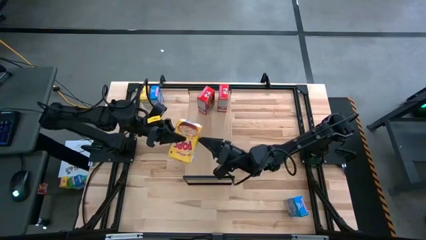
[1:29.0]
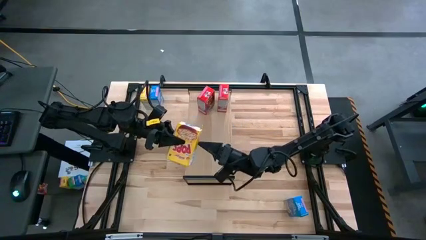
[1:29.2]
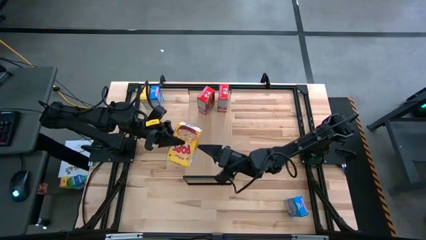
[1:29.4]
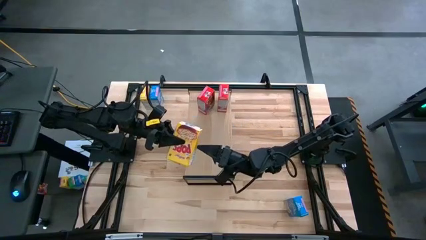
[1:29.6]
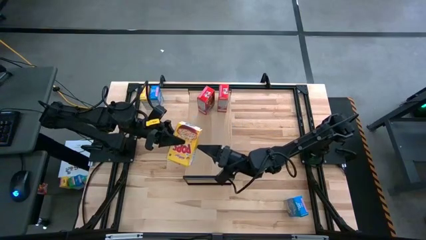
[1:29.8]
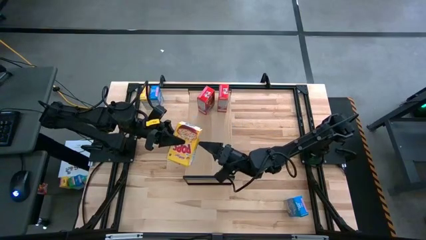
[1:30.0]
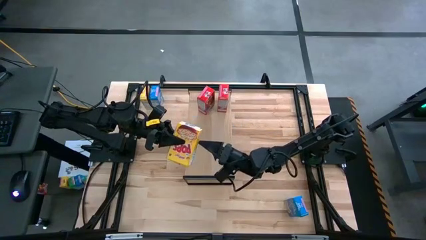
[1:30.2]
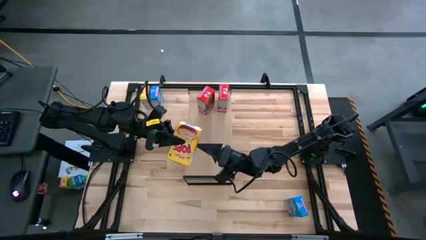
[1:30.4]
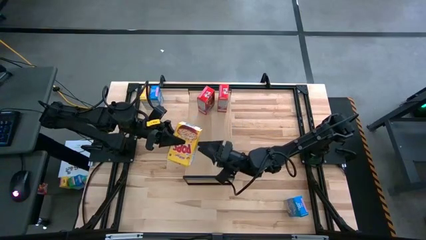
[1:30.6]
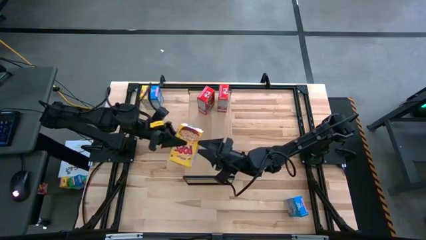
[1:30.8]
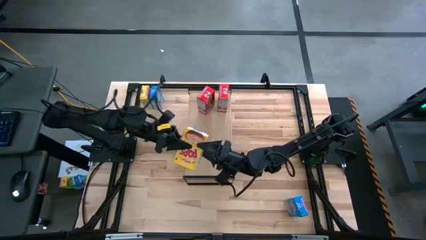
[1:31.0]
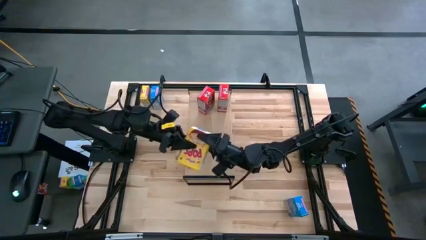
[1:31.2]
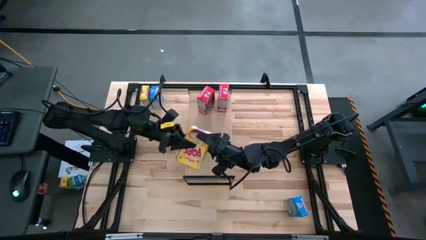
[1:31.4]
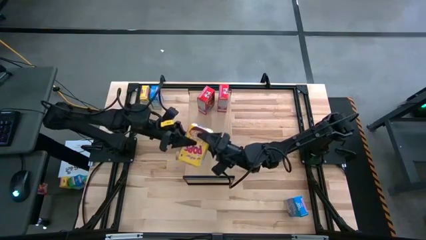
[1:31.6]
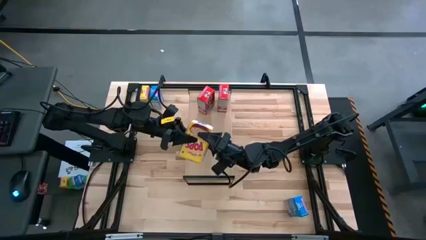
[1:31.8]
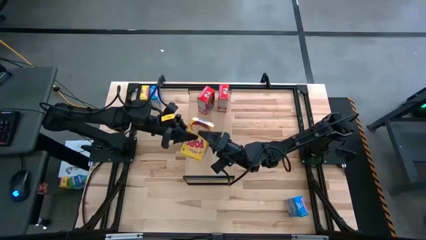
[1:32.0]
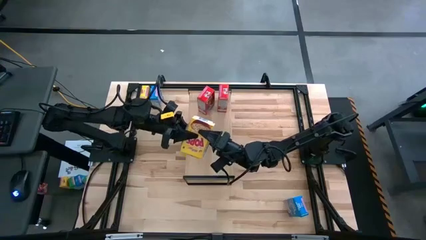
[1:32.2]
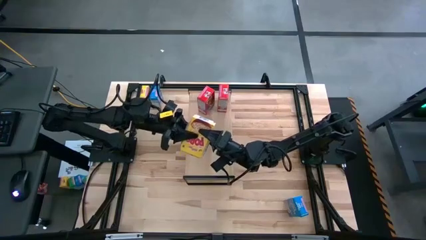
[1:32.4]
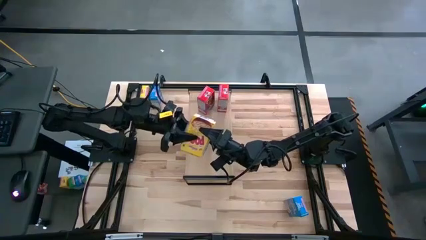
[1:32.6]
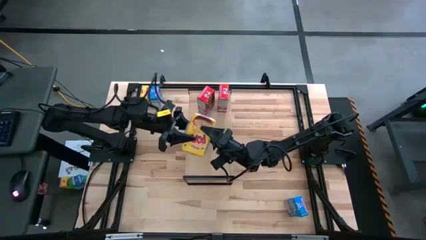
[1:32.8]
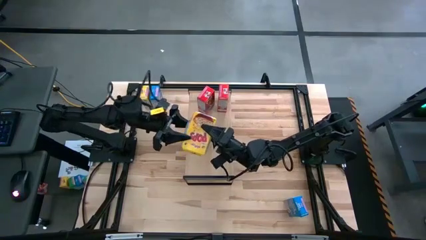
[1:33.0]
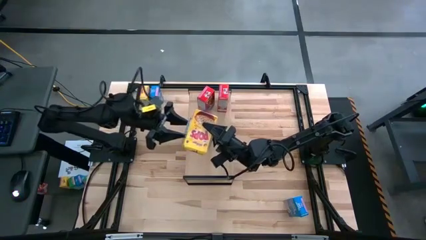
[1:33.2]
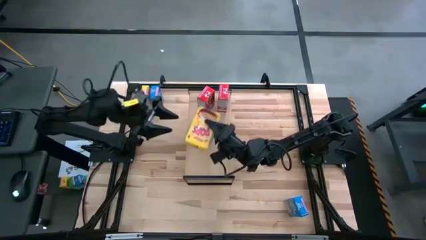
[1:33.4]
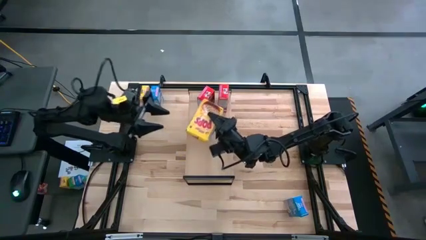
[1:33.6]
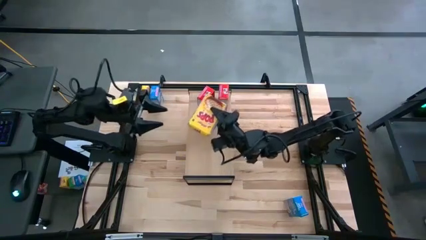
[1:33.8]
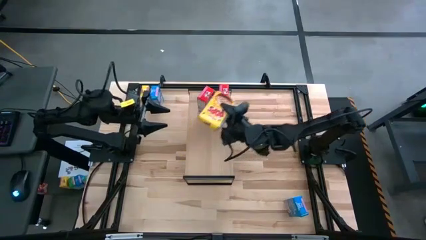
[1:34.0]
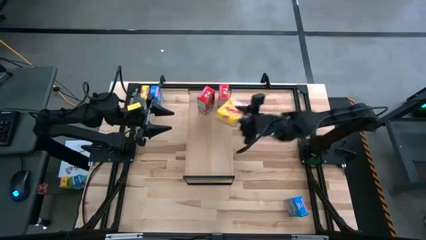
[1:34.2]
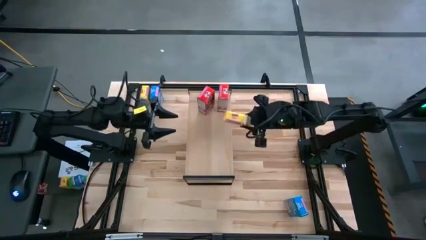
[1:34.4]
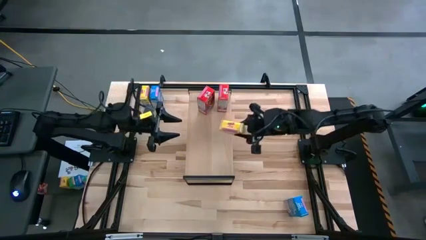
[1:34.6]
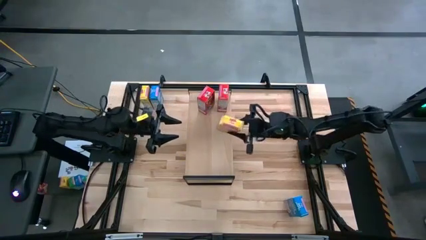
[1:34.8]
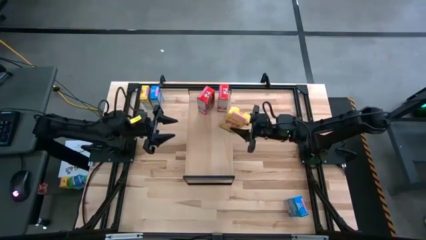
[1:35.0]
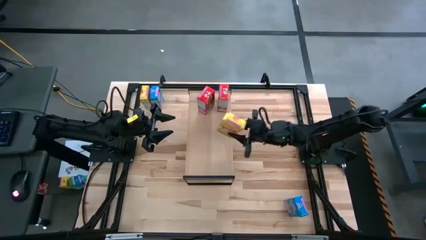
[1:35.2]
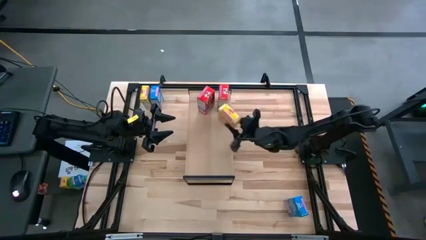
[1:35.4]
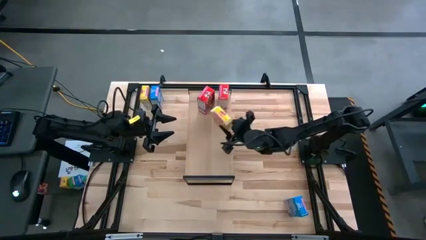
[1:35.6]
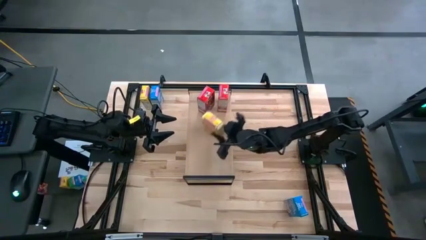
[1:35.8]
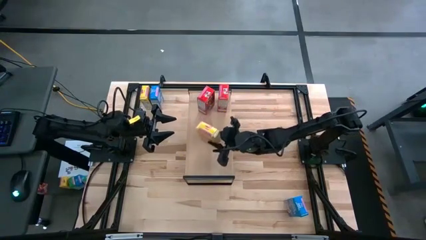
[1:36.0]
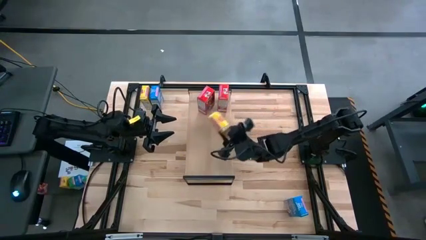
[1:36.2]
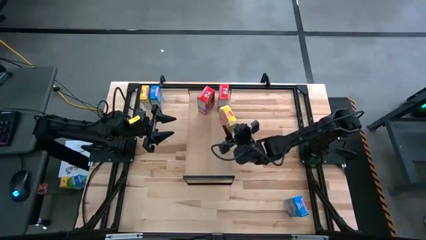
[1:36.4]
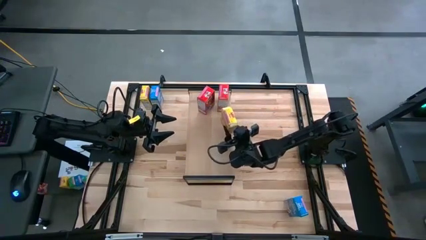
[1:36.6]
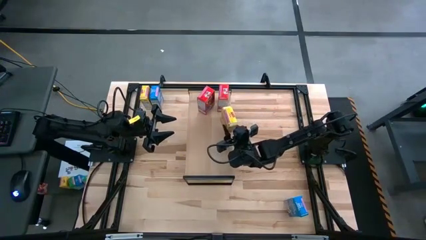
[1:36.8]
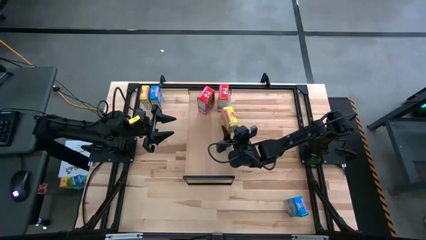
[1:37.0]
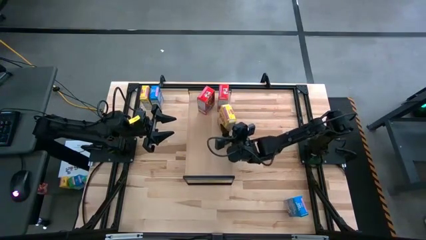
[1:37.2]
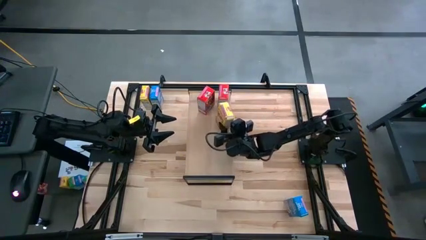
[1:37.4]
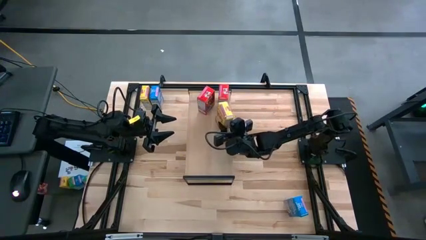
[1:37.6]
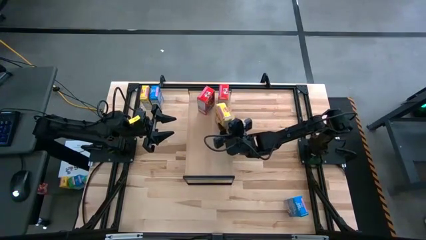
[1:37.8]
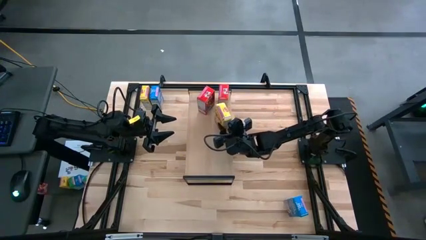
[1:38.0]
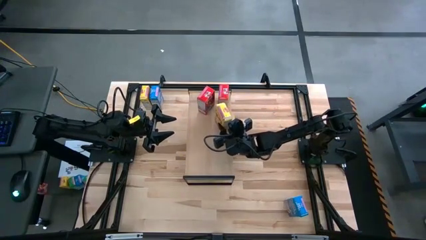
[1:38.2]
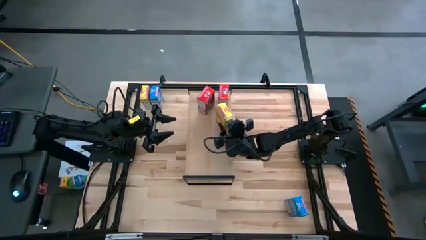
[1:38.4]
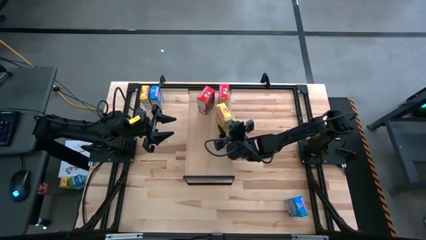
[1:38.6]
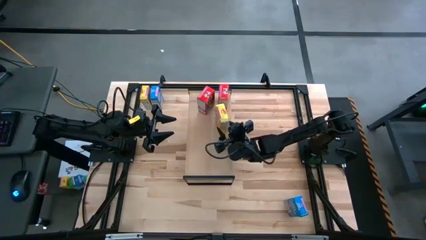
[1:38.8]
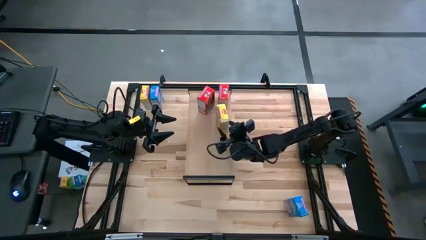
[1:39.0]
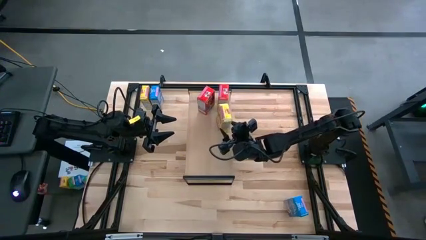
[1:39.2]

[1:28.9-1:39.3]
Task: Stack cereal on shelf
Put the bottom yellow cereal box on the shelf

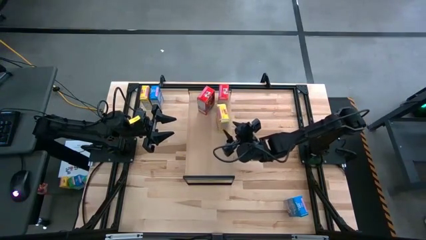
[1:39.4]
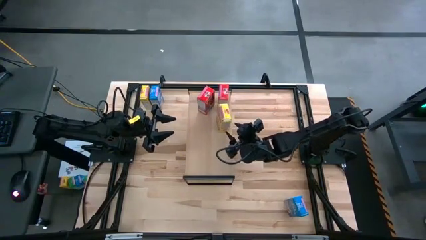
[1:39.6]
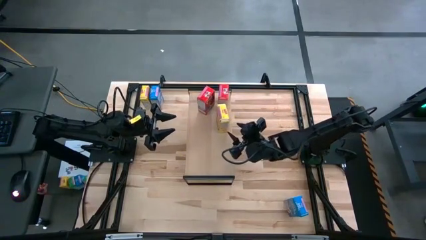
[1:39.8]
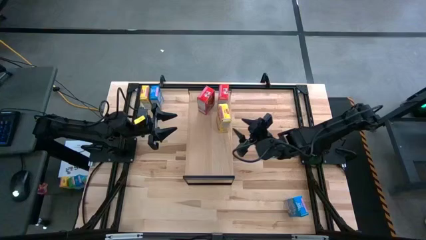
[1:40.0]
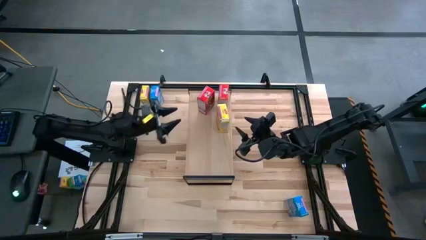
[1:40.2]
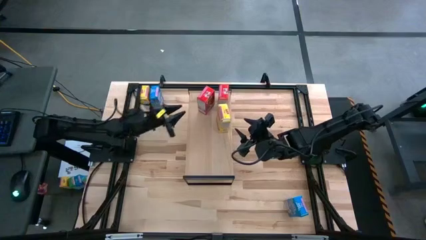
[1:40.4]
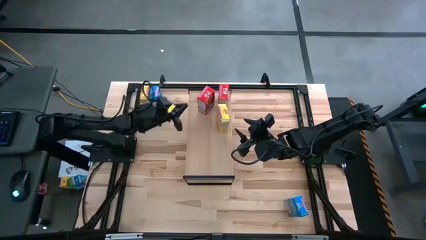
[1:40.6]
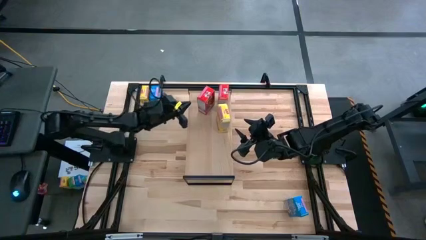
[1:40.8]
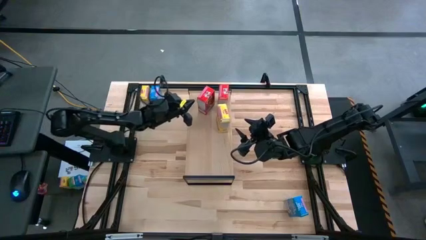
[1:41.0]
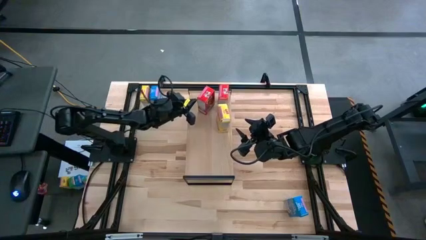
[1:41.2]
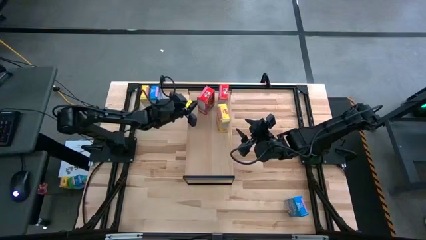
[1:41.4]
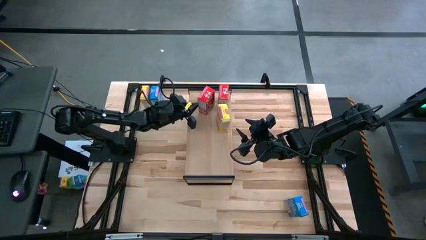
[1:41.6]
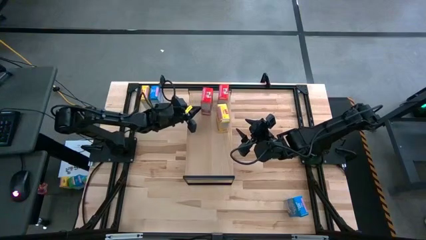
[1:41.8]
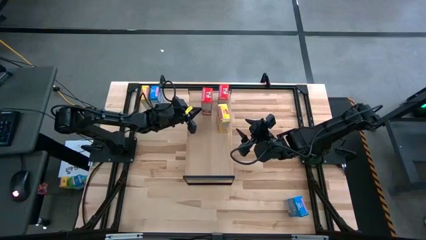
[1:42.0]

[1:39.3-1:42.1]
Adjust the red cereal box on the shelf
